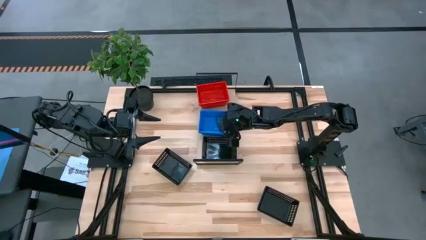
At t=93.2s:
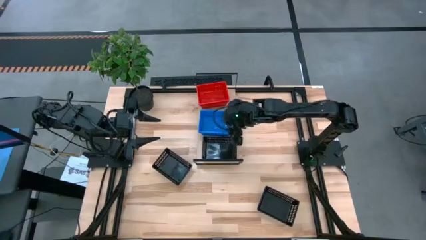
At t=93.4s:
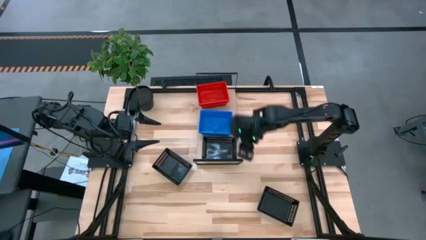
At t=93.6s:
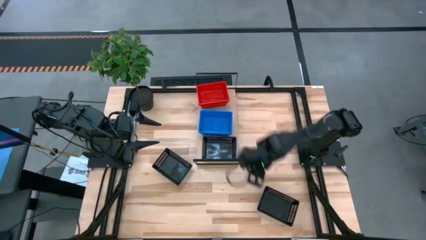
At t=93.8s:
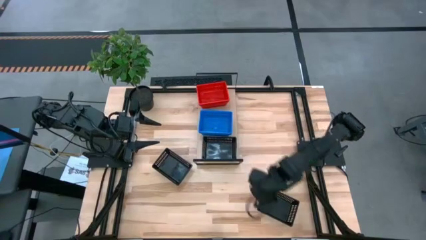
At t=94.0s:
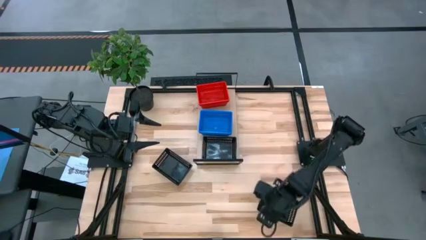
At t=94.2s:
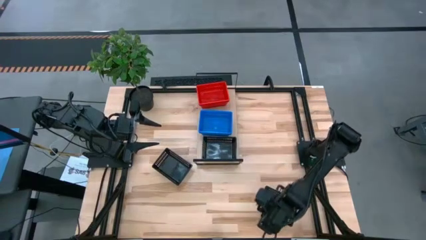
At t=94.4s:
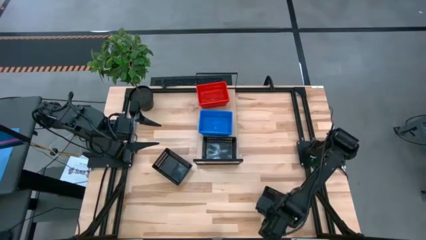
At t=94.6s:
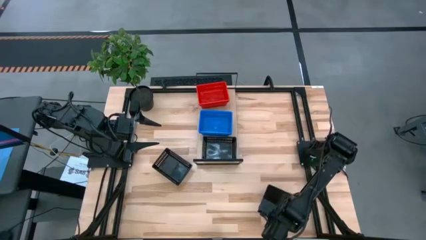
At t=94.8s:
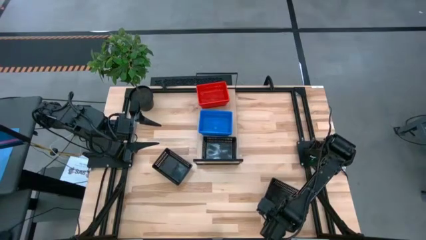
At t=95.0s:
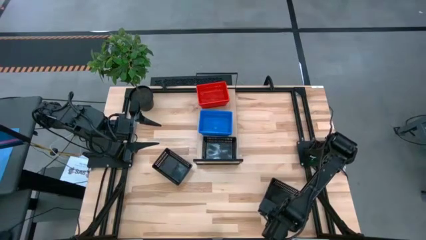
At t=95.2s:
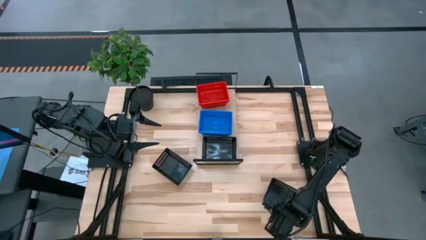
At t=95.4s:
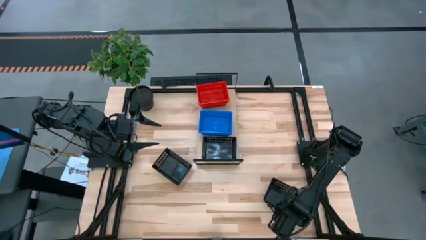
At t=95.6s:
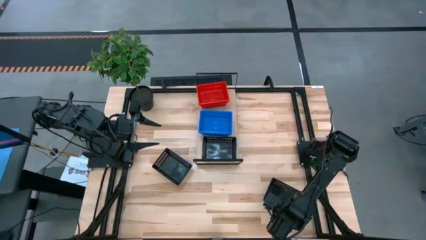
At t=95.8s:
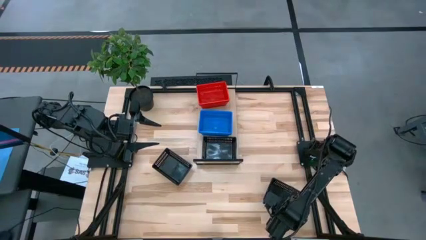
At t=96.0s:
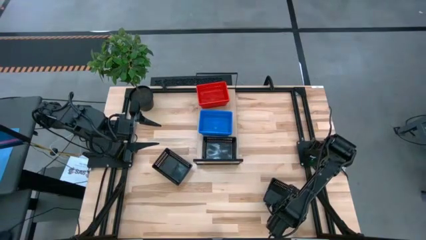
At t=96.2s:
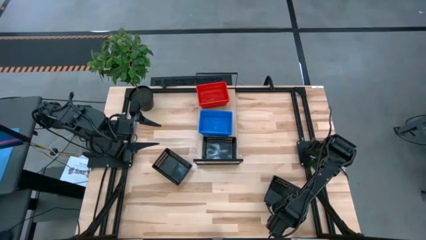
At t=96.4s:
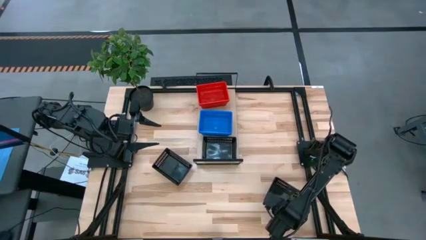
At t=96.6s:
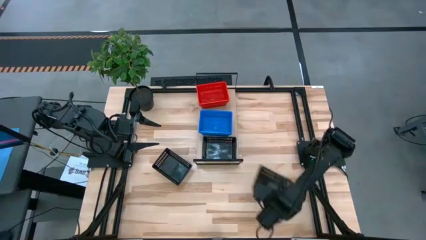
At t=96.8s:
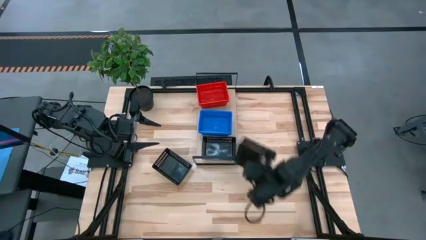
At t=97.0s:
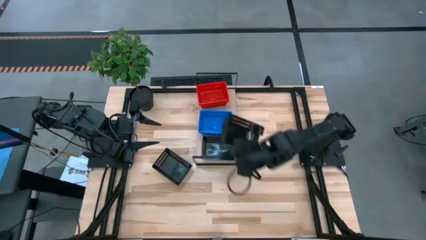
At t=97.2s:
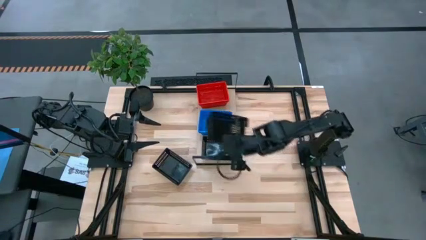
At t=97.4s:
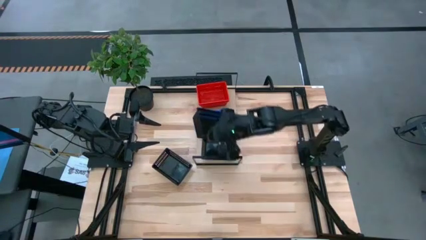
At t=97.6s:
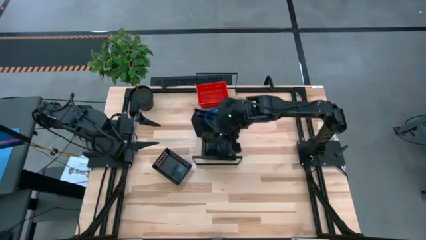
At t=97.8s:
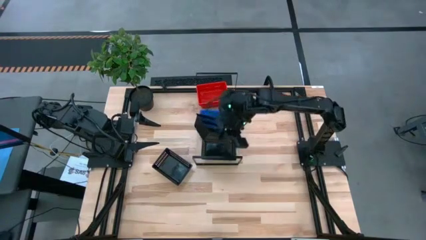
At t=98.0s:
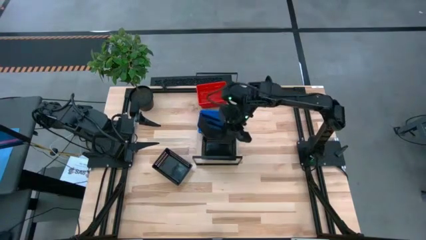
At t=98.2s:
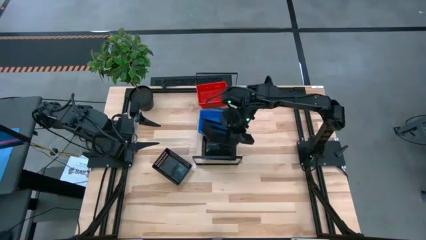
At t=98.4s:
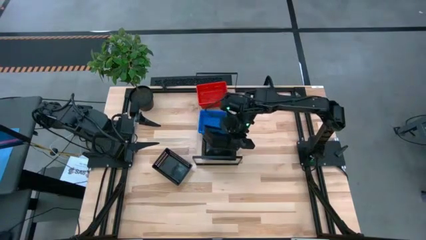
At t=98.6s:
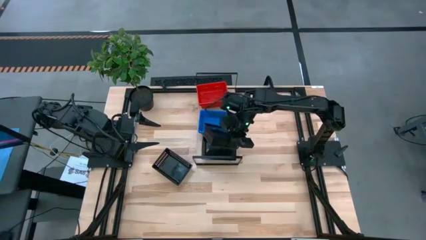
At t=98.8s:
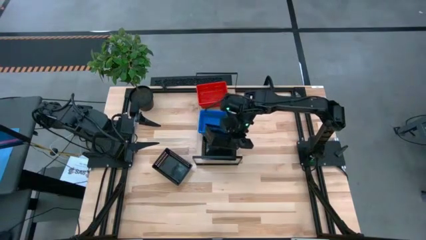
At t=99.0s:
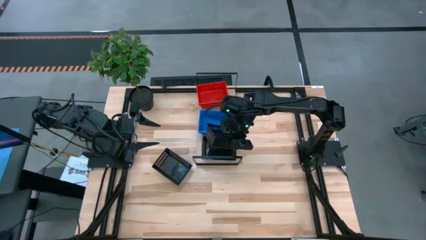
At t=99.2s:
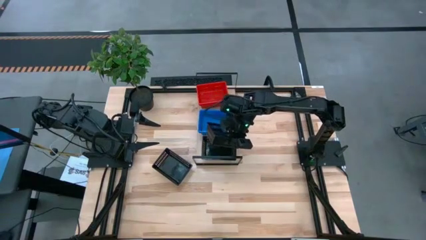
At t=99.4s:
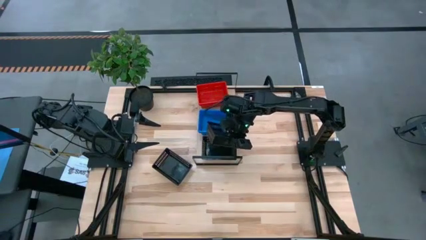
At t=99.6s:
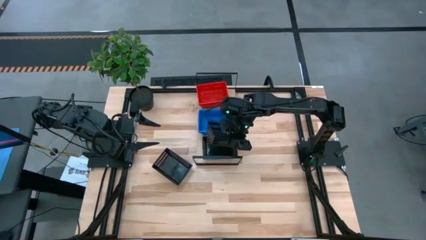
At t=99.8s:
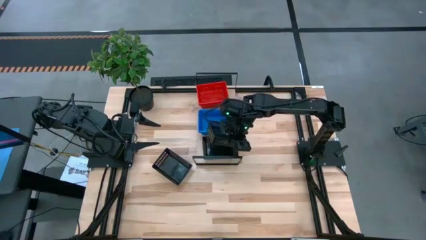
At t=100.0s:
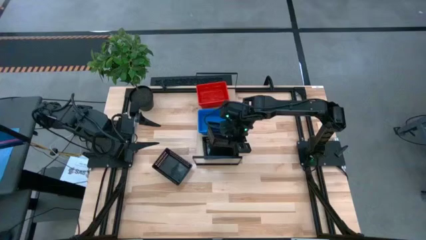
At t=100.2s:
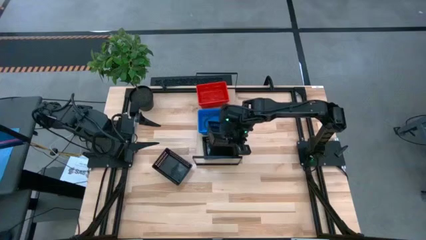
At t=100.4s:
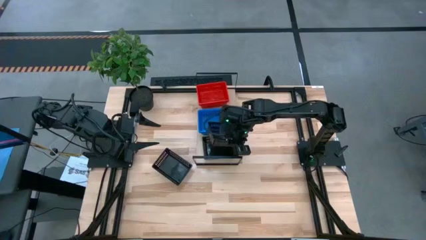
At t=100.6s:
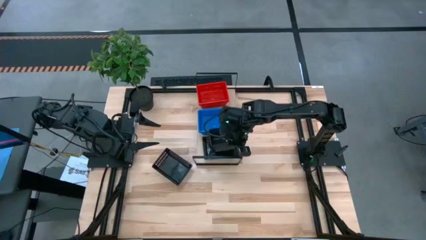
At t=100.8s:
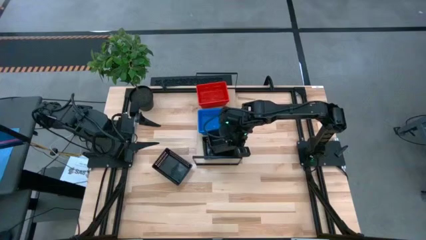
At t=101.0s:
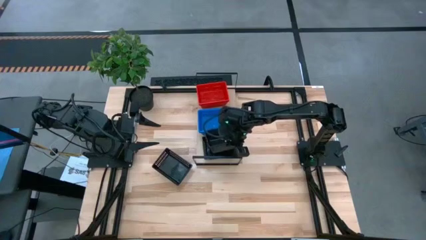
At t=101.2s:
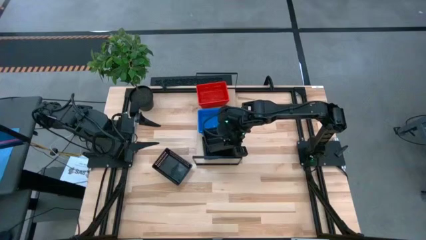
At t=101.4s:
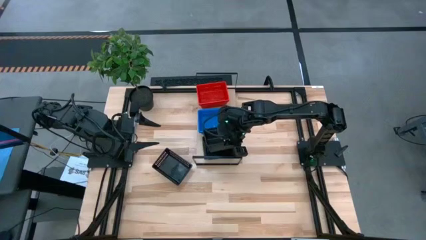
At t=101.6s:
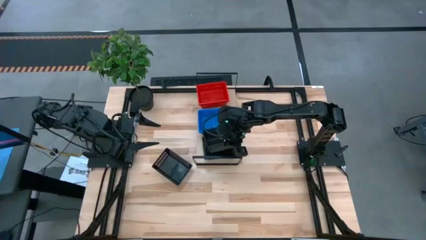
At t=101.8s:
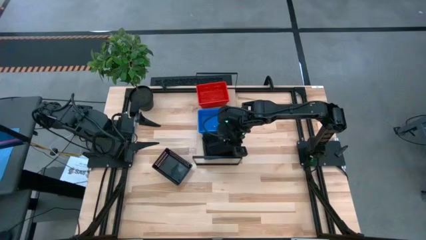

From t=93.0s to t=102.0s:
Task: Stack baskets on shelf by color
Stack the bottom black bin on the black bin on the shelf

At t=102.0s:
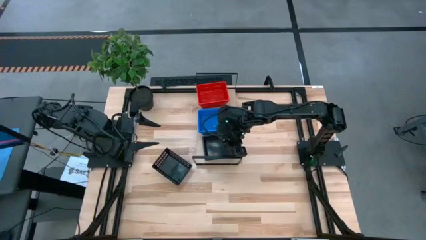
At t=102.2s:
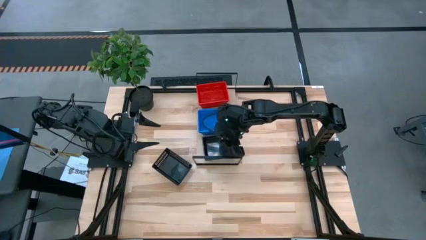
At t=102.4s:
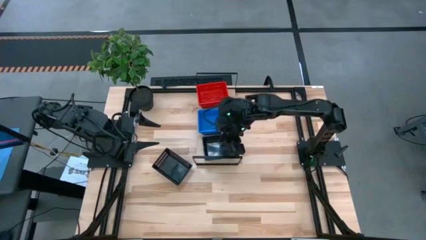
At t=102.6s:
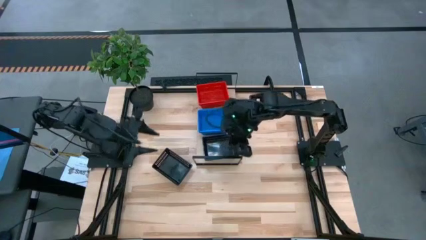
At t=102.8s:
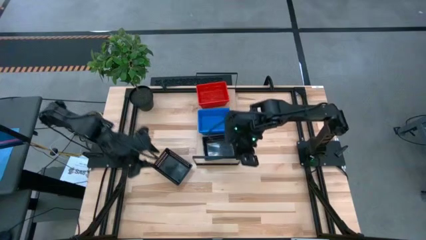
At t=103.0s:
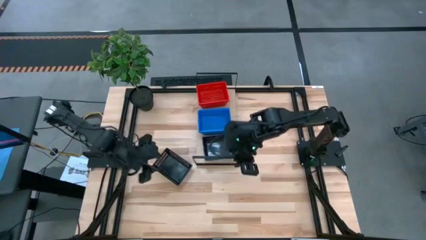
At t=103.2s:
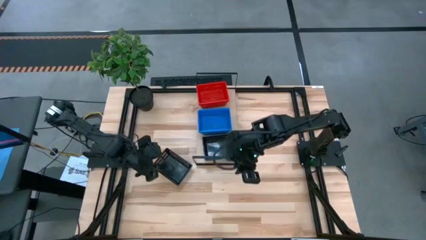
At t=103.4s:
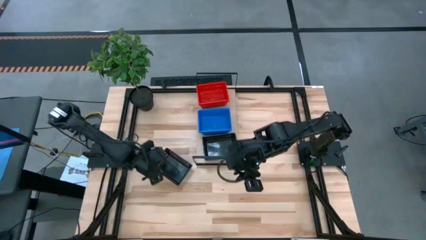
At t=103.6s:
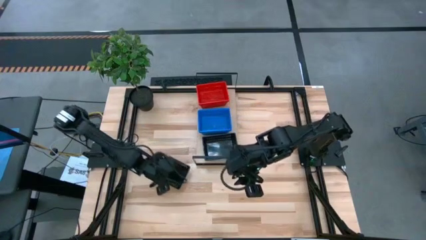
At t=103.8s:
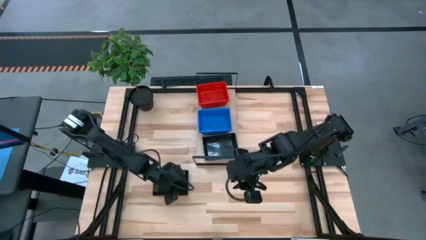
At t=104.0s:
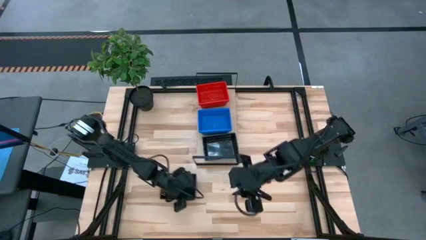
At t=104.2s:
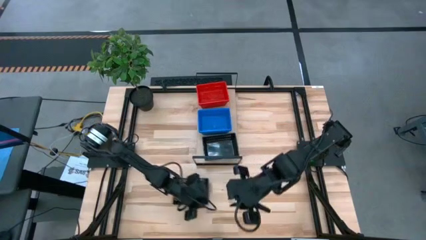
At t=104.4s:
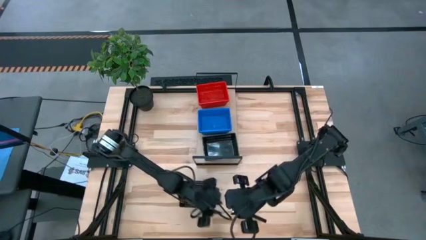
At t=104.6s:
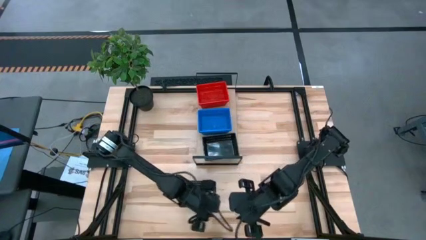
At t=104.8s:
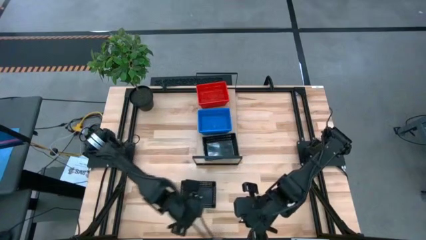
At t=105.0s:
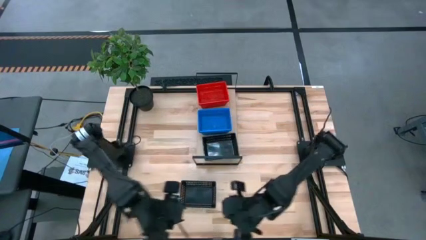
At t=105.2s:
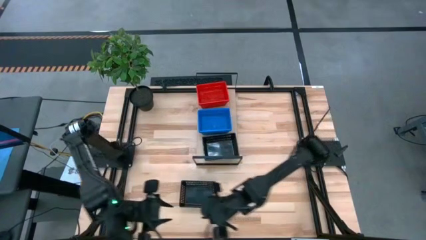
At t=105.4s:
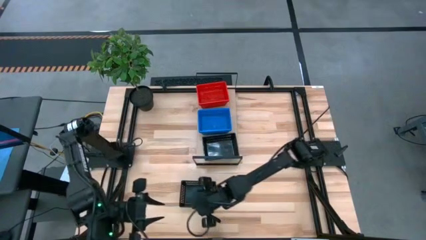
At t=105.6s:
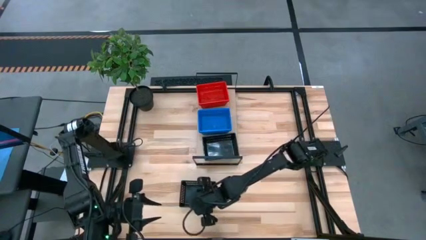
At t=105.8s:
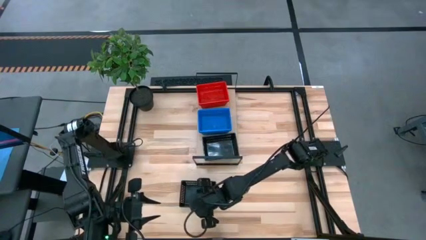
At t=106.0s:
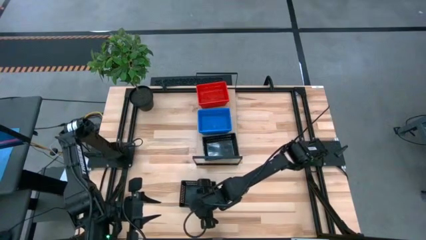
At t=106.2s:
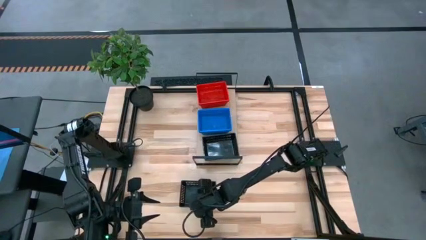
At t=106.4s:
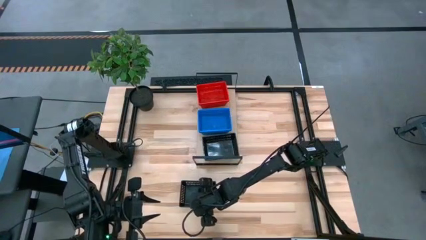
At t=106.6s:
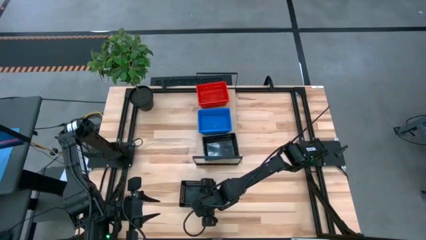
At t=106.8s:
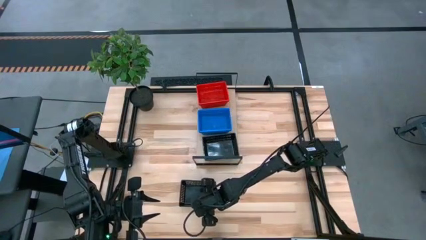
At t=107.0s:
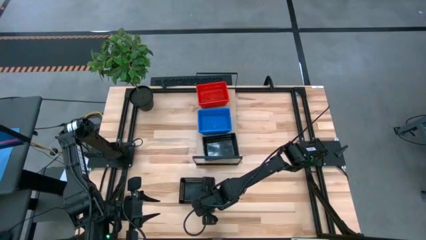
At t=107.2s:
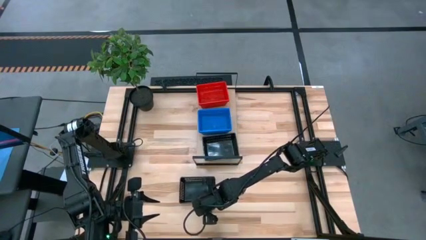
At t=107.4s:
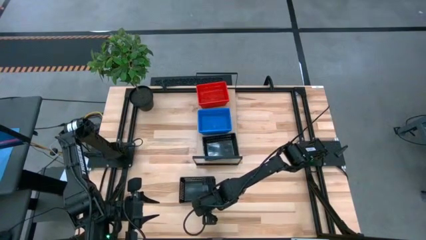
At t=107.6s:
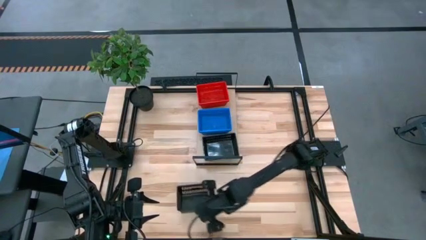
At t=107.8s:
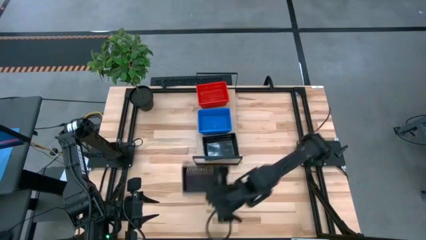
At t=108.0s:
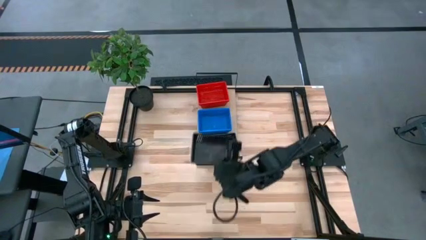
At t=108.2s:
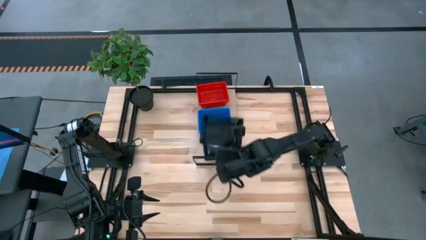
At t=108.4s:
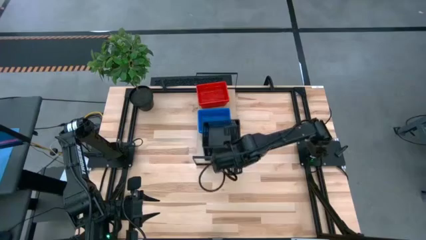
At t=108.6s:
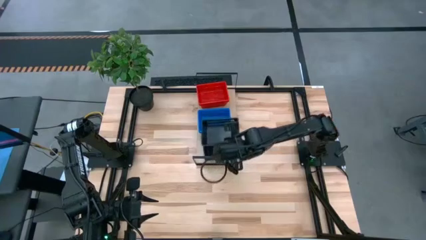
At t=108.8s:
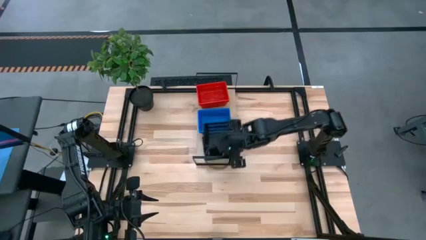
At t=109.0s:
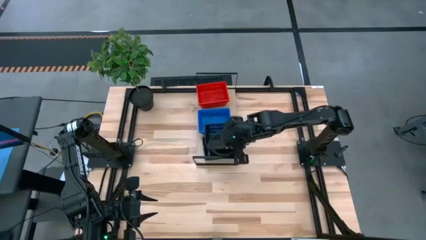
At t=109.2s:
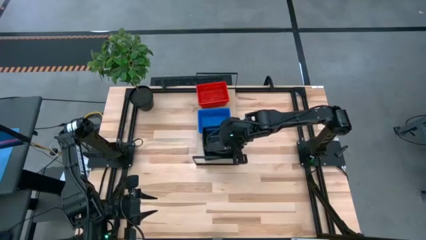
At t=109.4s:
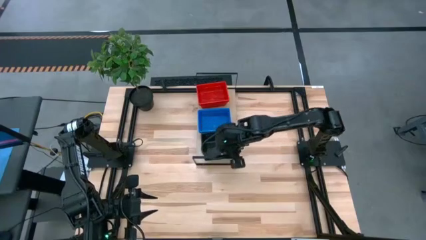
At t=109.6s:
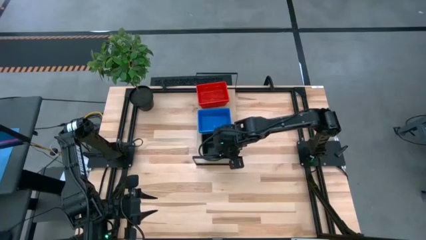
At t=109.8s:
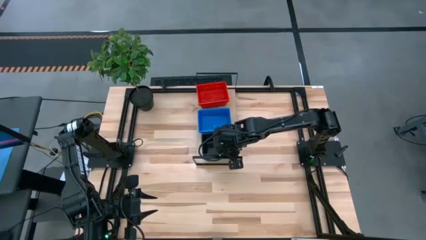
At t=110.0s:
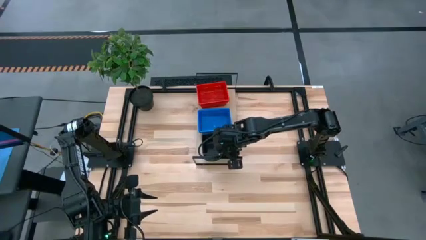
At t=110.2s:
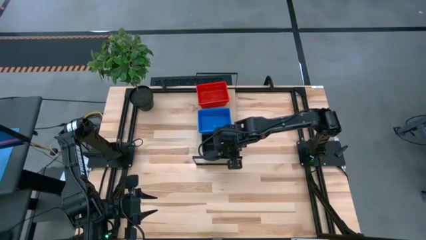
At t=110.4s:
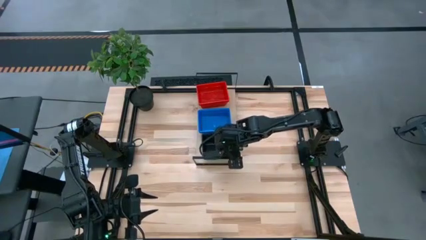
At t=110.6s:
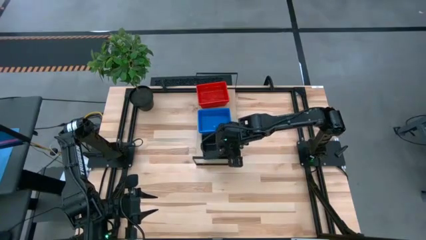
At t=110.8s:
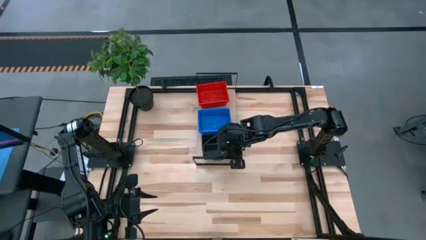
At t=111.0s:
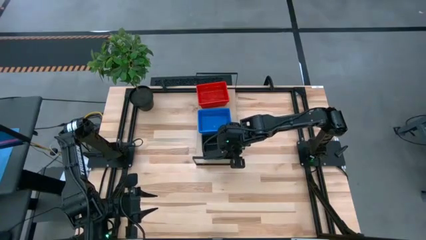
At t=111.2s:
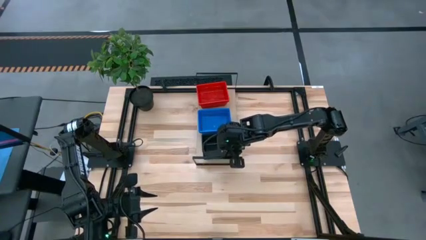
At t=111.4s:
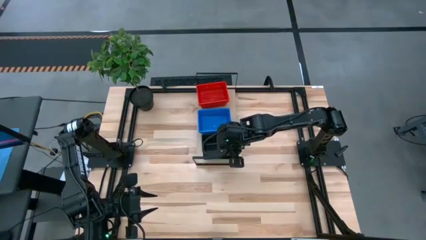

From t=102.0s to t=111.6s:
Stack the black bin on the black bin on the shelf
